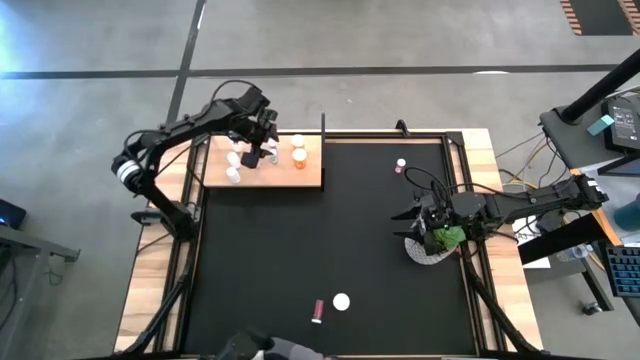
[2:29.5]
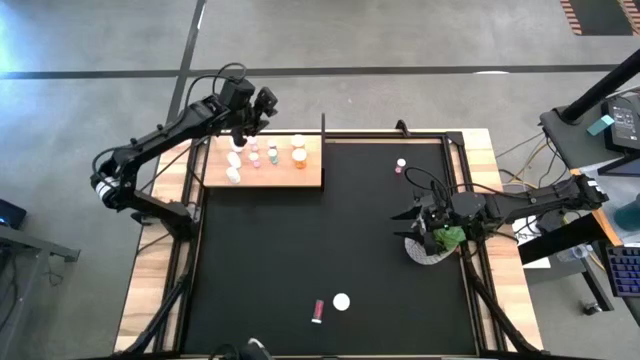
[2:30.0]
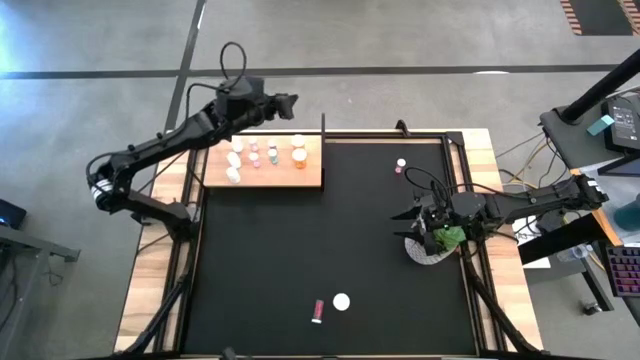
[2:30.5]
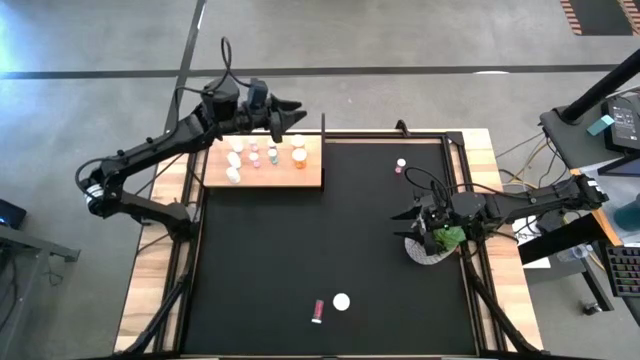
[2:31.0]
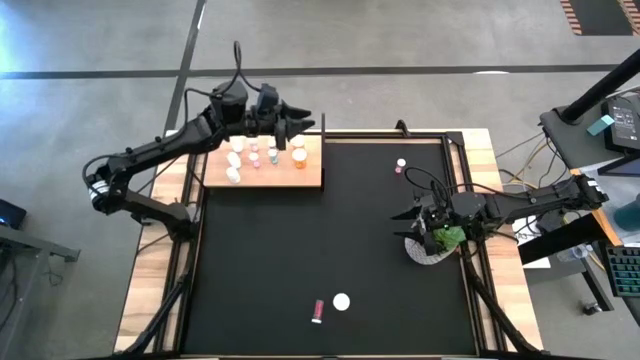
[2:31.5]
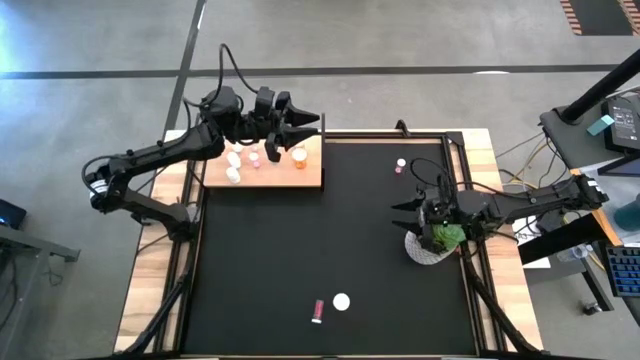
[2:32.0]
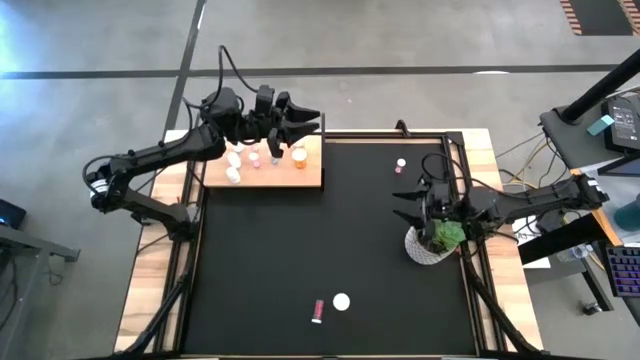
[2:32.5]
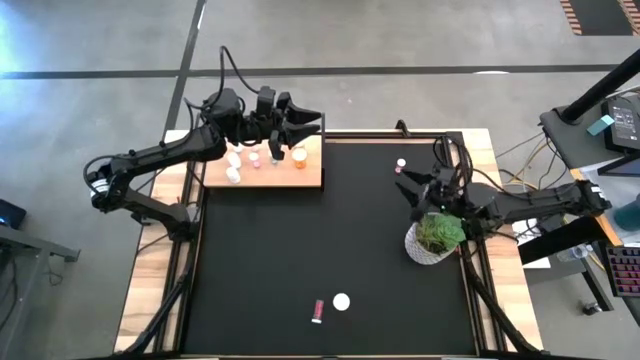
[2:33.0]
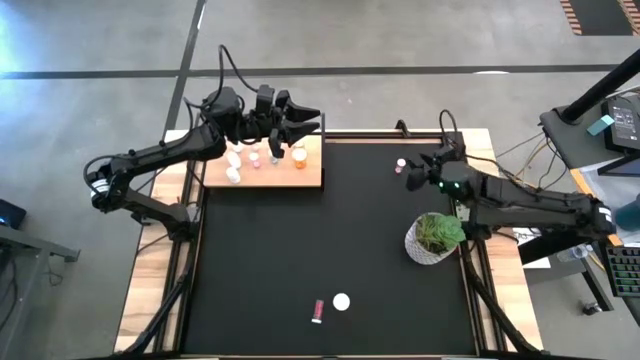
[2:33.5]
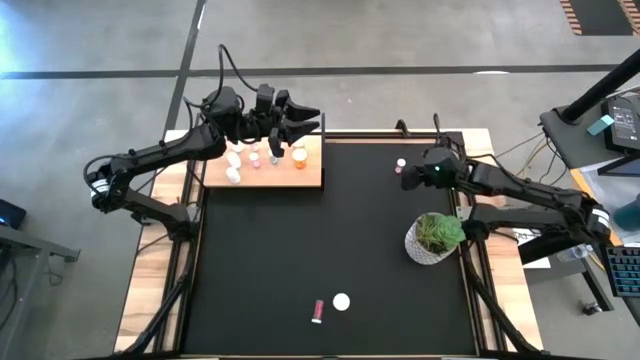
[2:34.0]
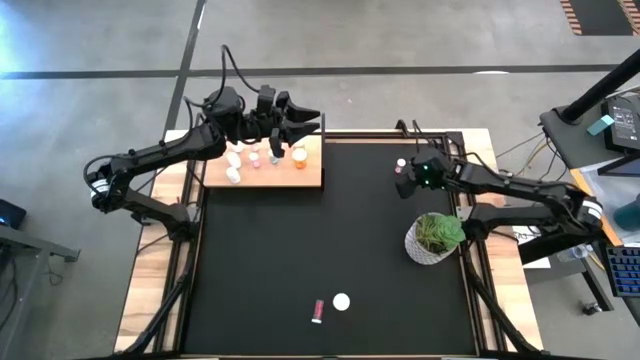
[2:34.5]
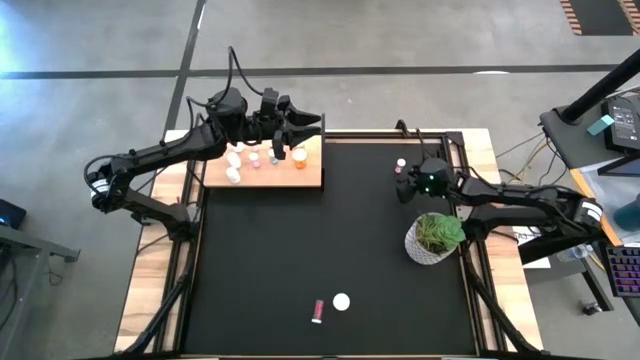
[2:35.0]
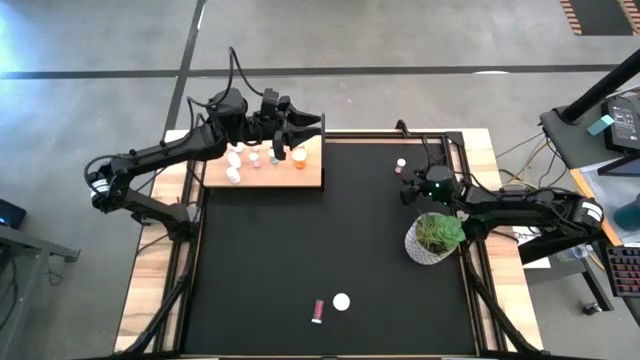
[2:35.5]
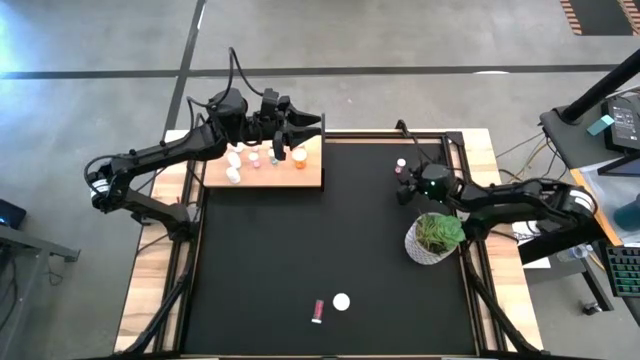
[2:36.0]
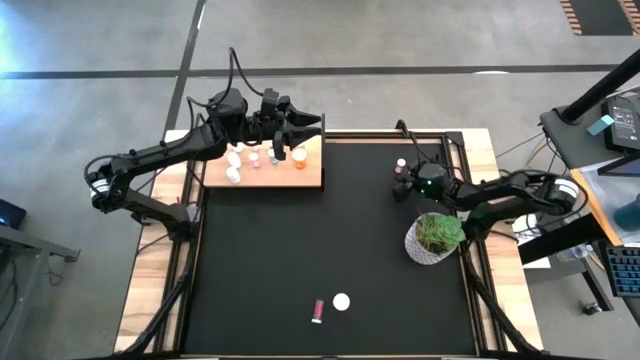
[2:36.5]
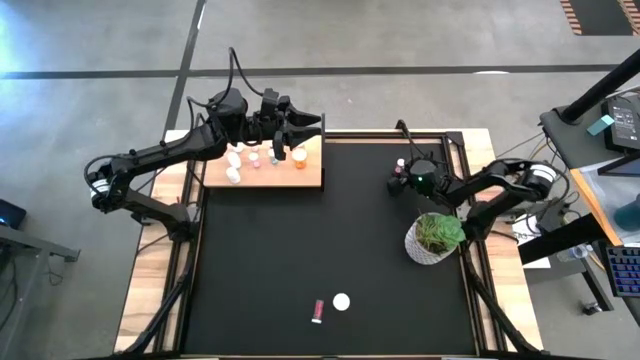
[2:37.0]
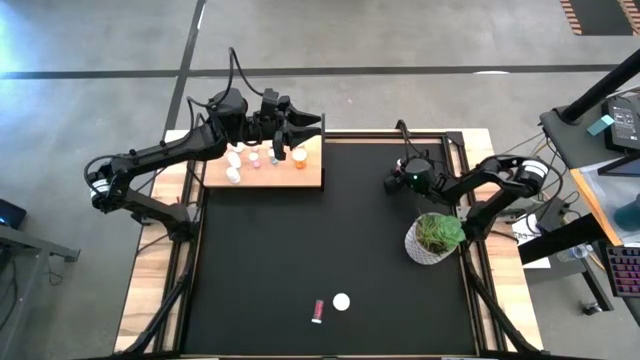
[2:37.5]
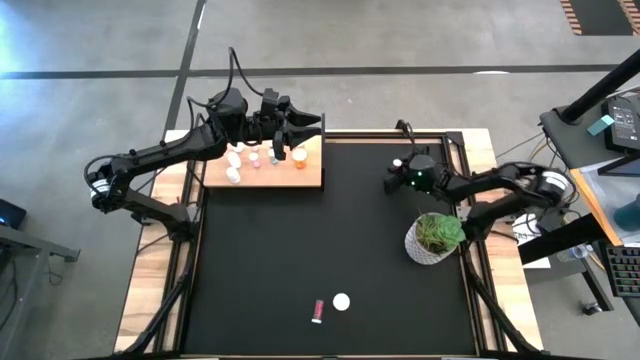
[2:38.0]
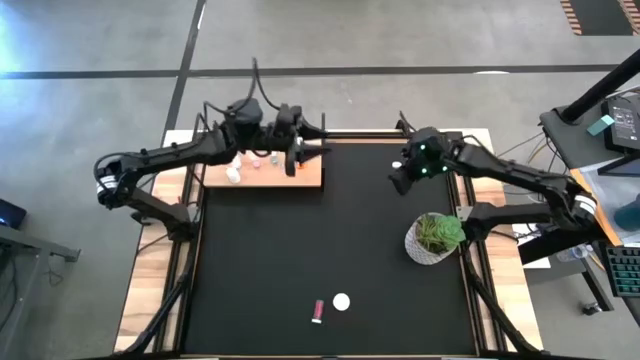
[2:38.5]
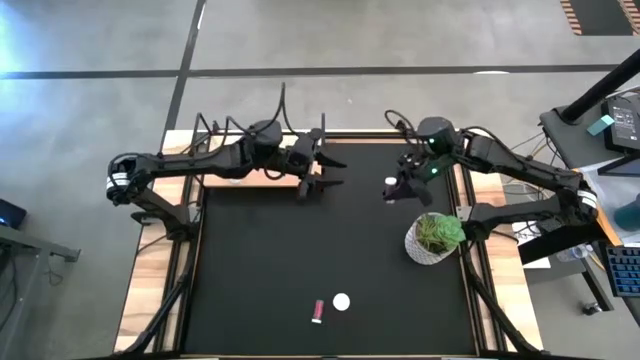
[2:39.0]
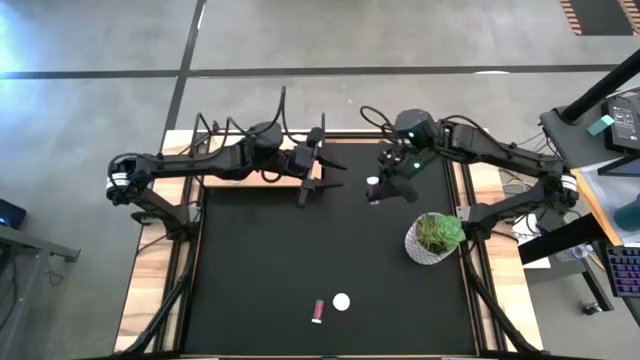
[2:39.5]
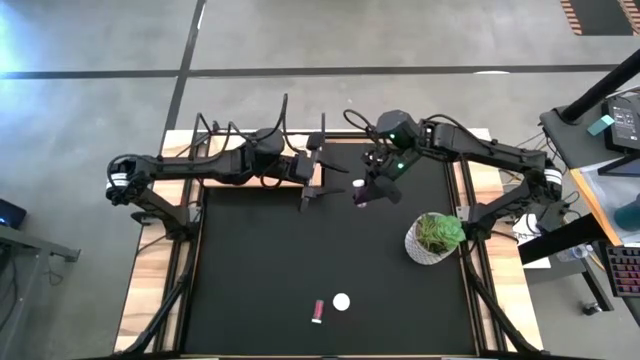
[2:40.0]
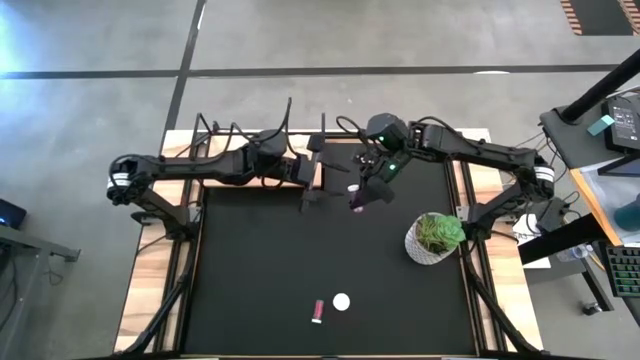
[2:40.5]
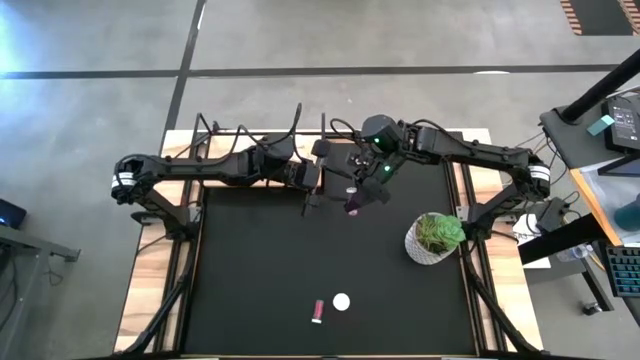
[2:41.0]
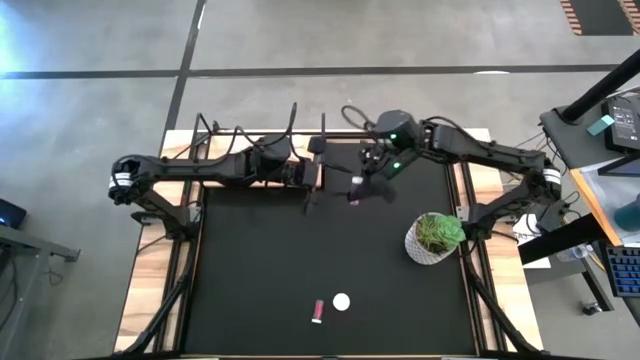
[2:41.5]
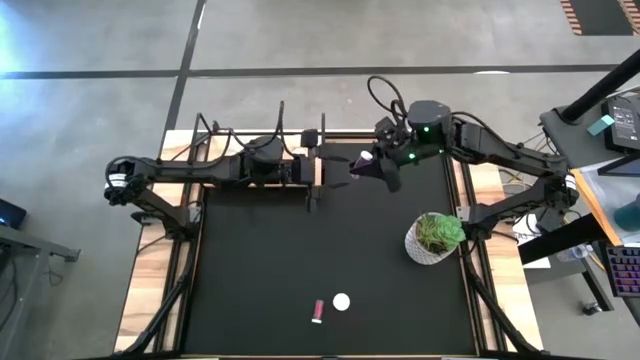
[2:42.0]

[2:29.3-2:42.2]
Task: Pick and place medicine bottles onto shelf by color
Put the pink pill bottle into the shelf

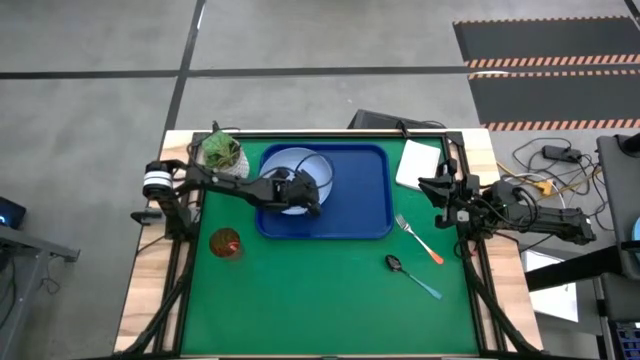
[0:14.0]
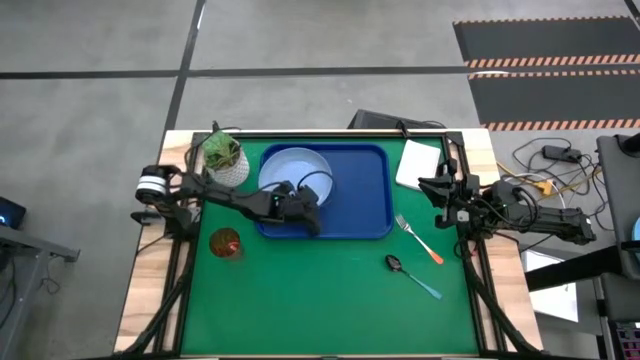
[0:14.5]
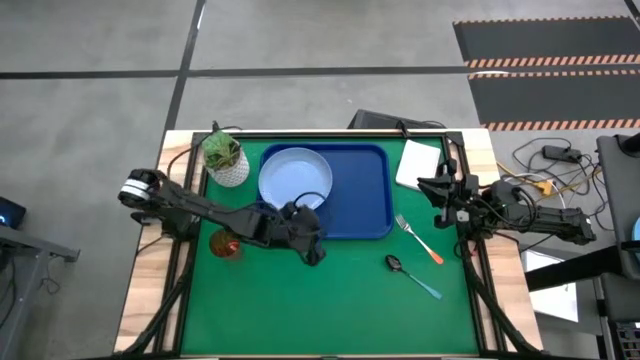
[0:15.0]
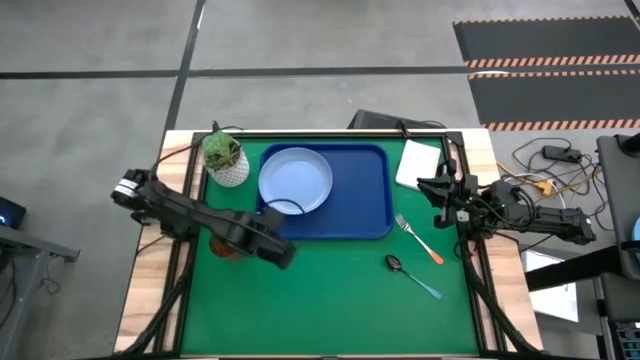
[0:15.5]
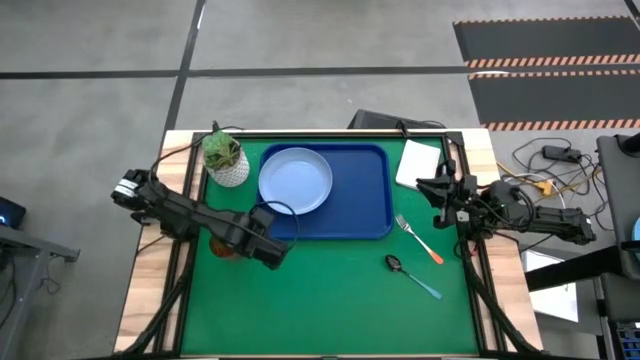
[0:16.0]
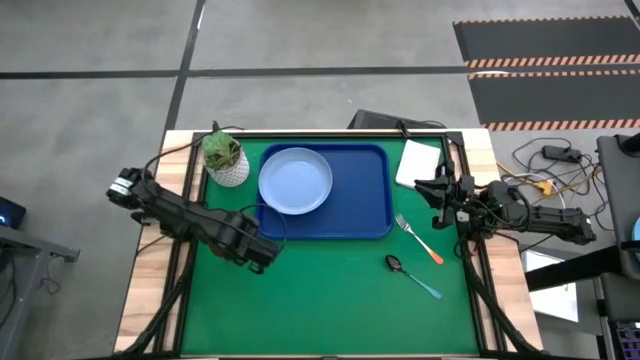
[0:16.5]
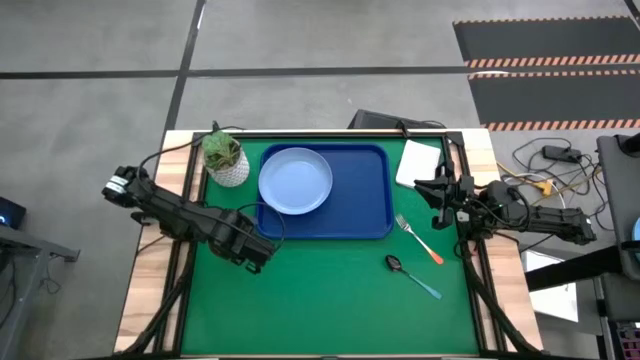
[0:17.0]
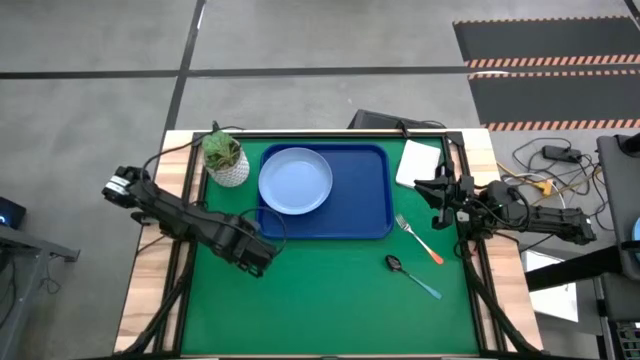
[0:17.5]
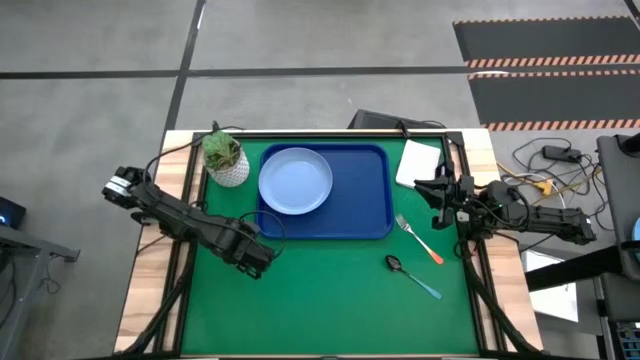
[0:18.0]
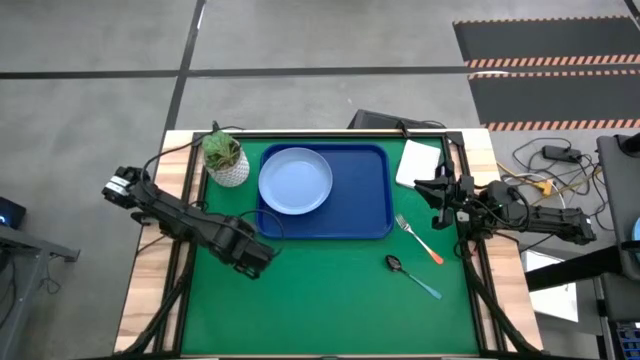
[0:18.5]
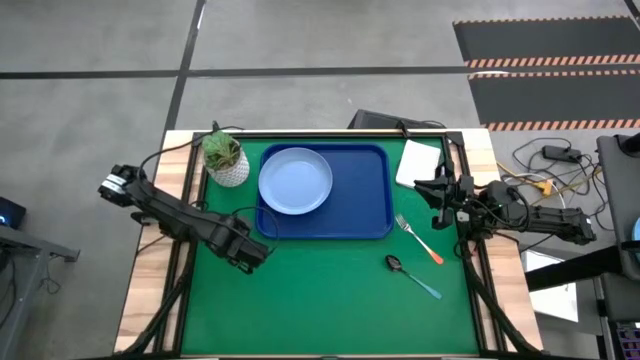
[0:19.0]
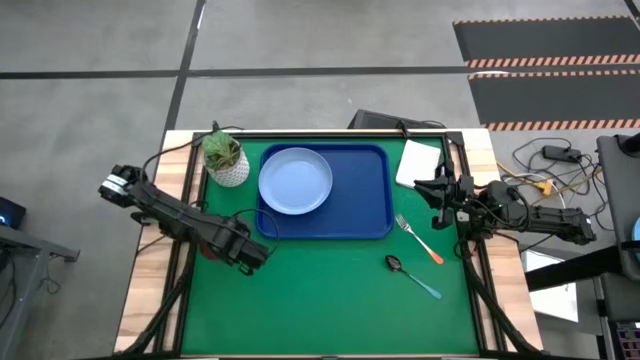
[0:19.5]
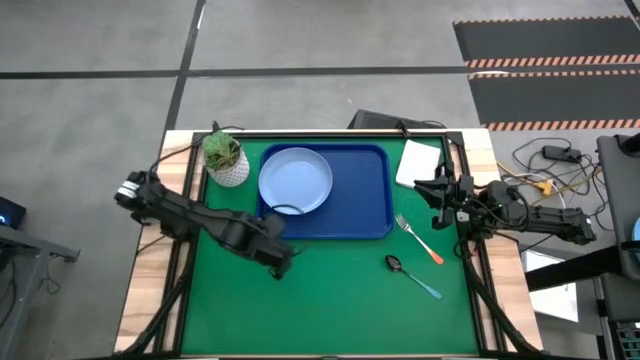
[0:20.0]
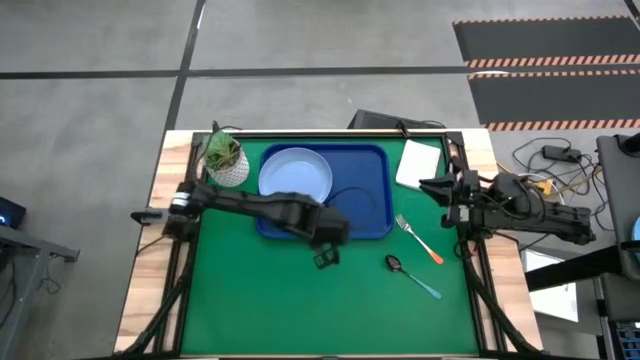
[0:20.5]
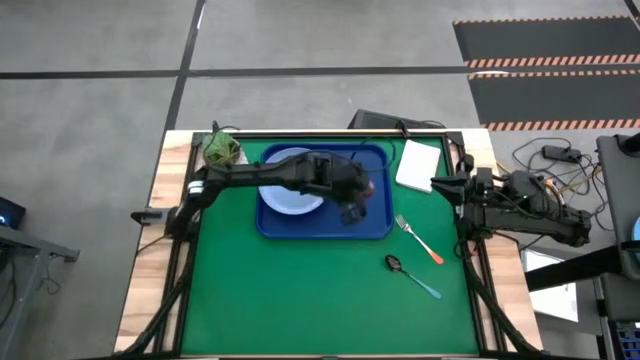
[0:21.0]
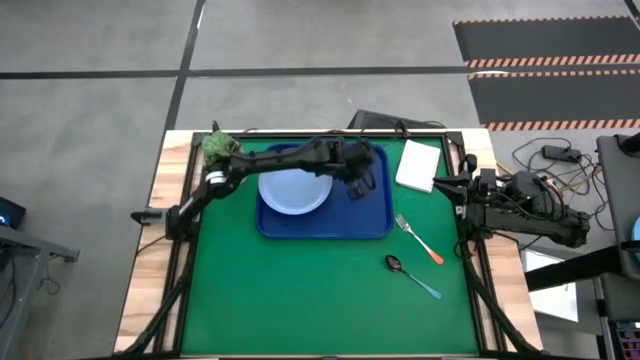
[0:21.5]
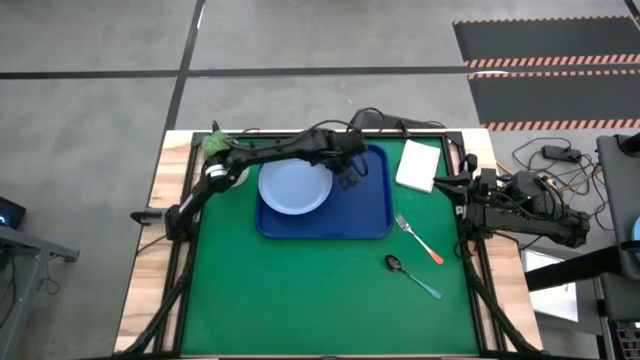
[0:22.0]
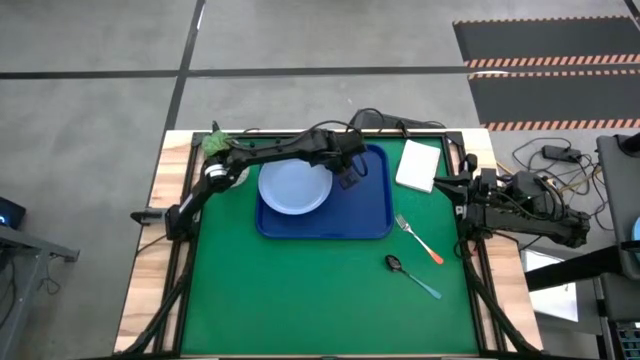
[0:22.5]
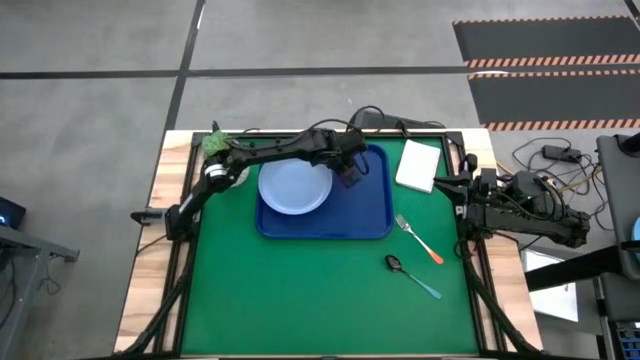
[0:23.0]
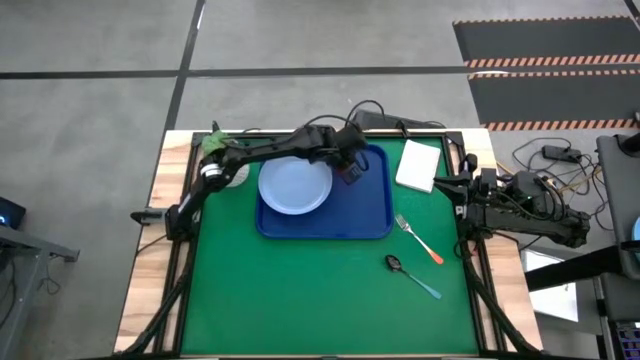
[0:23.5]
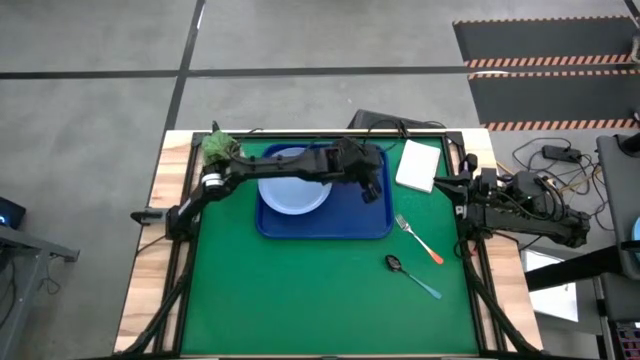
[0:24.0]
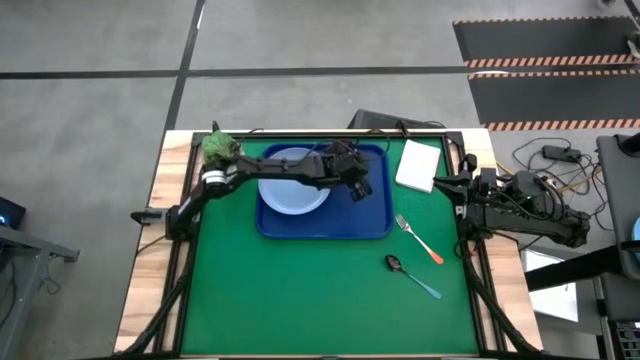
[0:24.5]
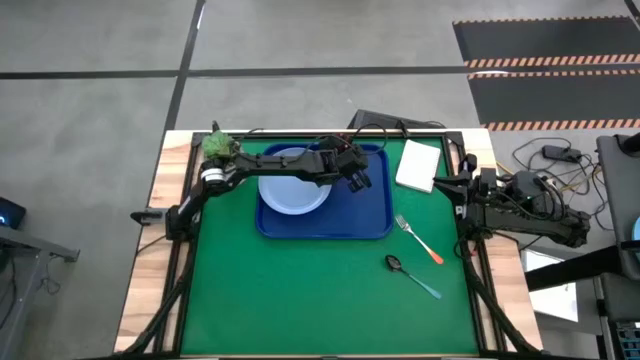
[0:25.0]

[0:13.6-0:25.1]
Task: Pick and place plate/cup/fork/spoon on tray
Put the orange cup on the blue tray to the top right of the blue plate
